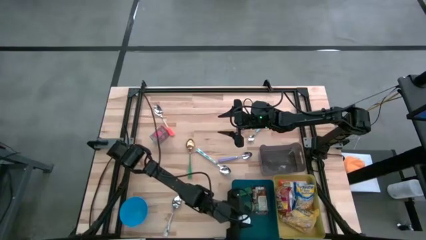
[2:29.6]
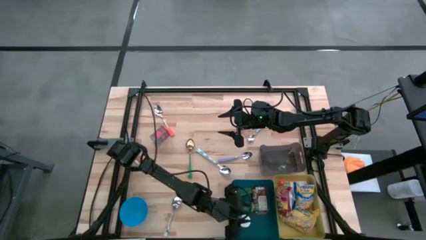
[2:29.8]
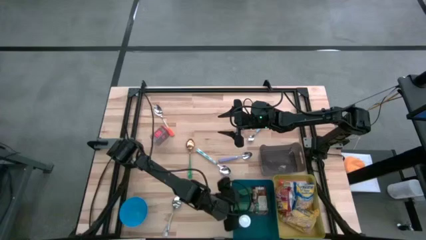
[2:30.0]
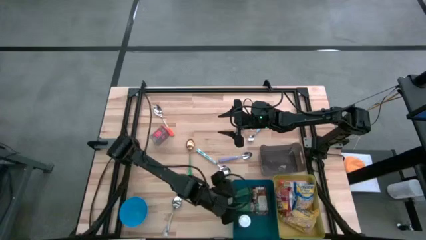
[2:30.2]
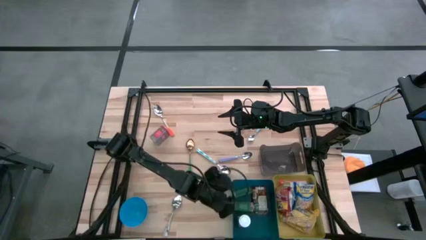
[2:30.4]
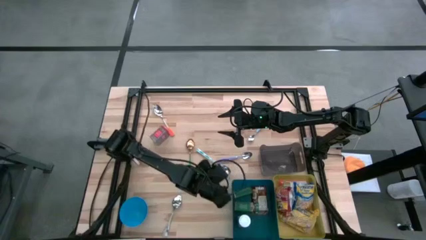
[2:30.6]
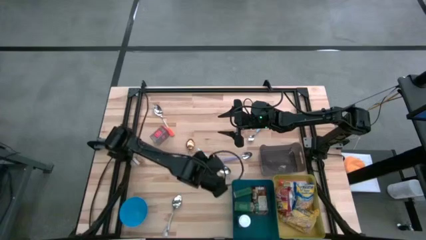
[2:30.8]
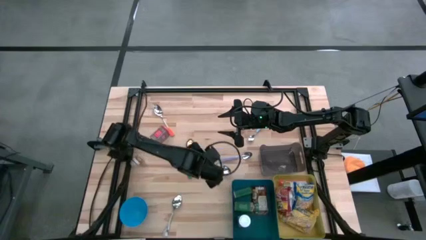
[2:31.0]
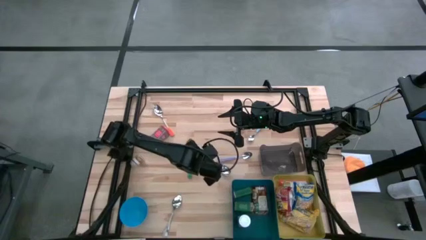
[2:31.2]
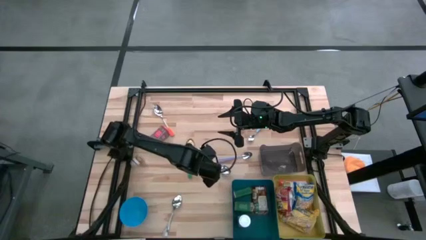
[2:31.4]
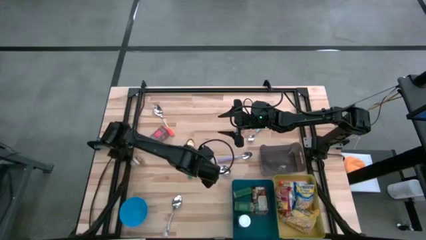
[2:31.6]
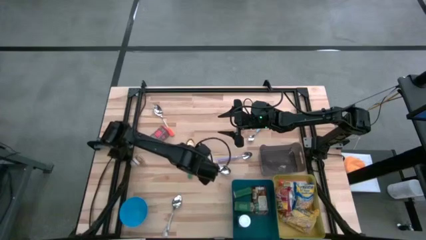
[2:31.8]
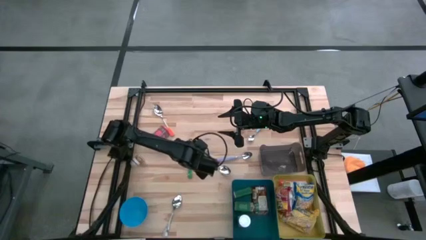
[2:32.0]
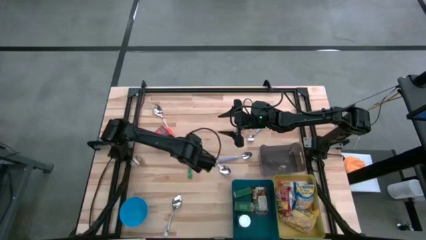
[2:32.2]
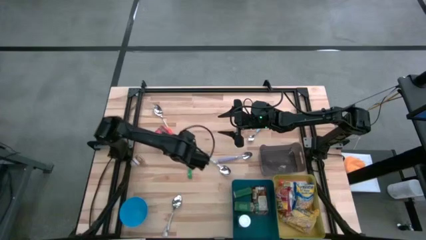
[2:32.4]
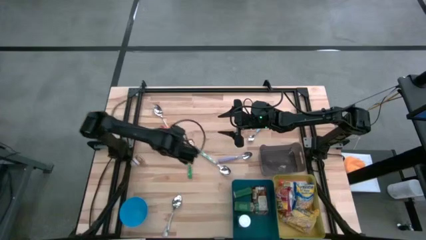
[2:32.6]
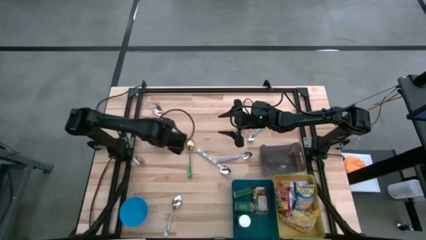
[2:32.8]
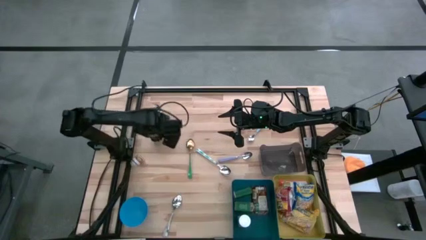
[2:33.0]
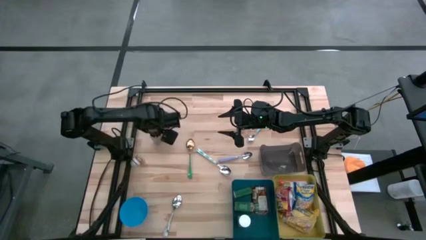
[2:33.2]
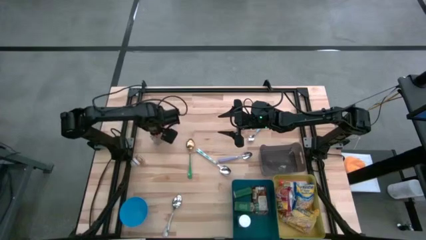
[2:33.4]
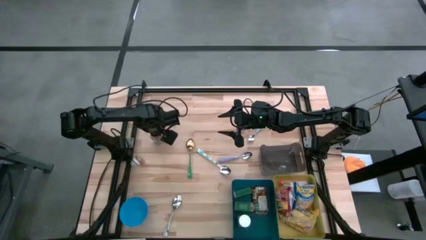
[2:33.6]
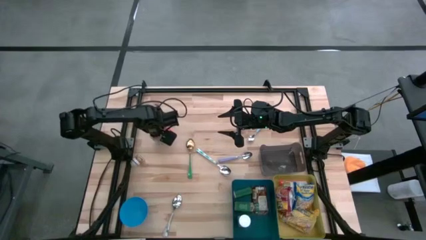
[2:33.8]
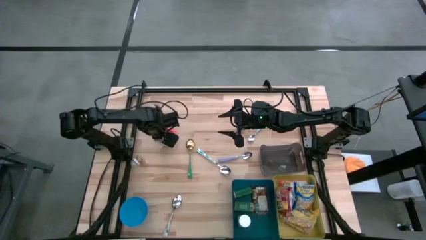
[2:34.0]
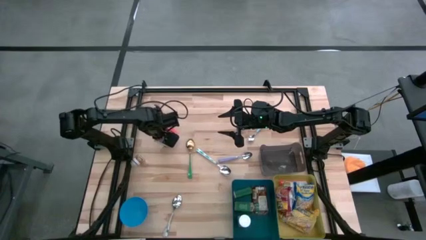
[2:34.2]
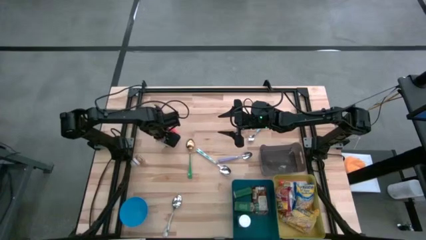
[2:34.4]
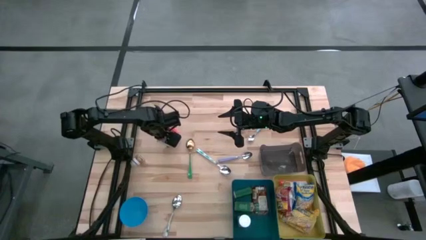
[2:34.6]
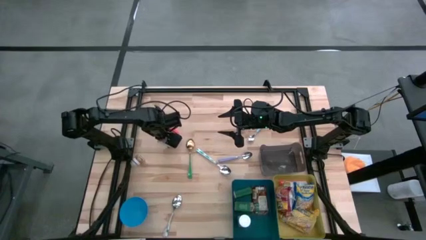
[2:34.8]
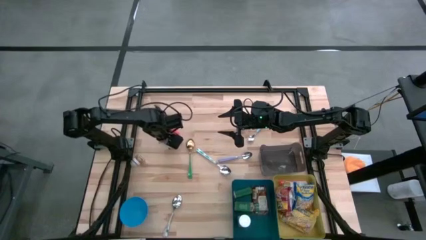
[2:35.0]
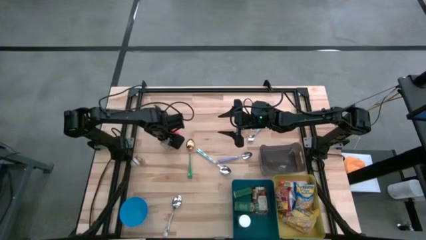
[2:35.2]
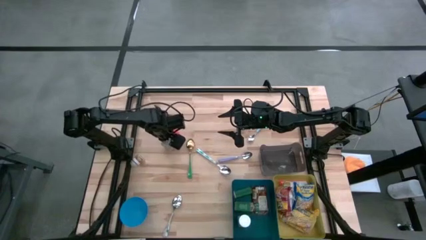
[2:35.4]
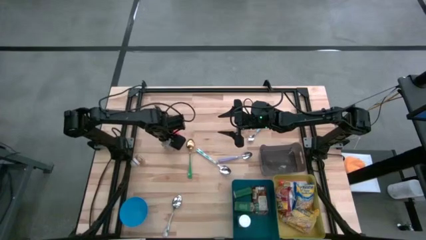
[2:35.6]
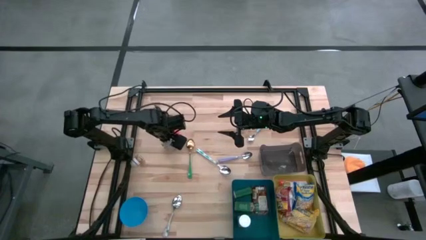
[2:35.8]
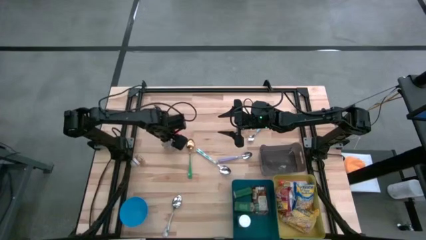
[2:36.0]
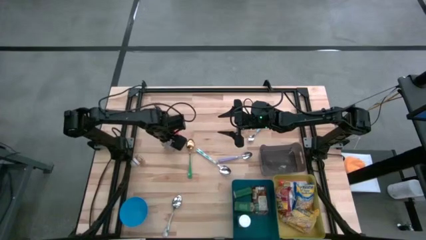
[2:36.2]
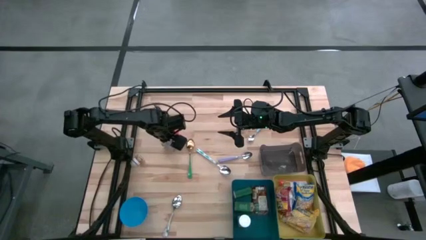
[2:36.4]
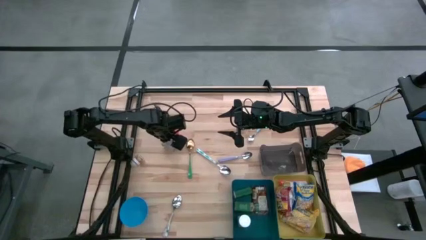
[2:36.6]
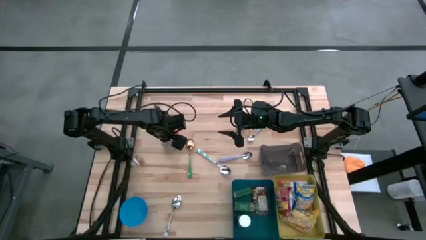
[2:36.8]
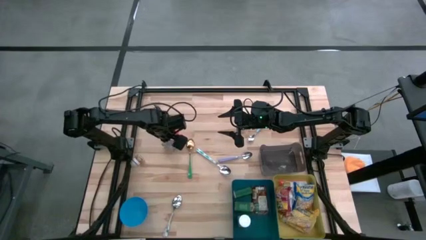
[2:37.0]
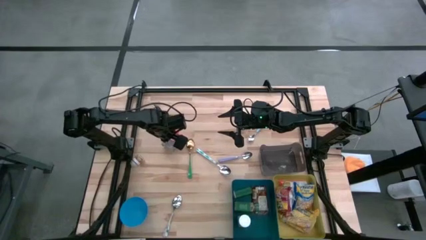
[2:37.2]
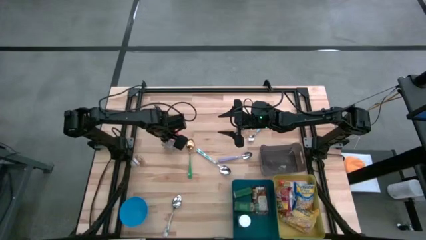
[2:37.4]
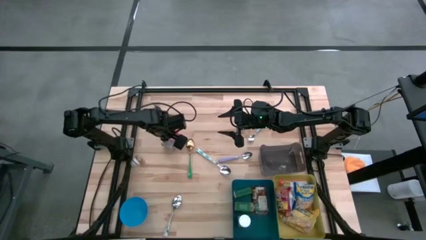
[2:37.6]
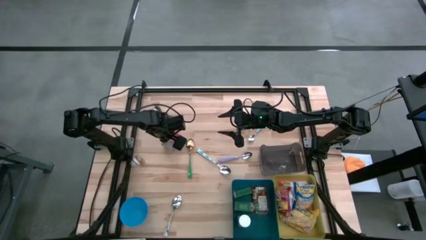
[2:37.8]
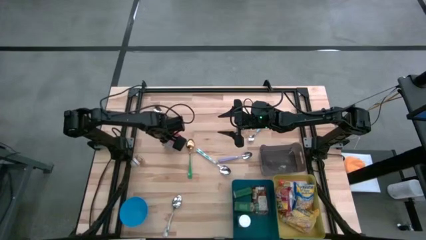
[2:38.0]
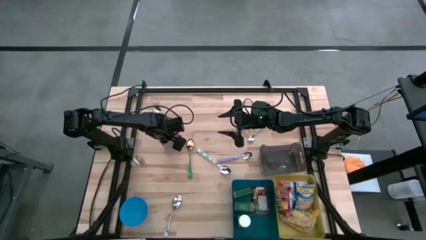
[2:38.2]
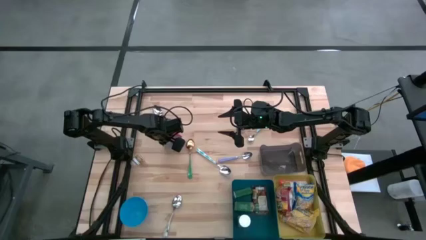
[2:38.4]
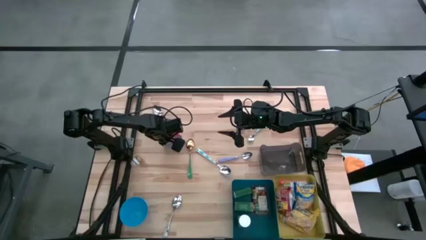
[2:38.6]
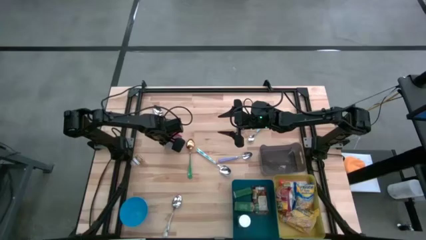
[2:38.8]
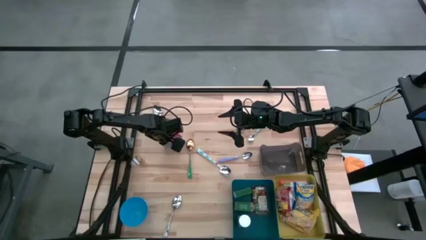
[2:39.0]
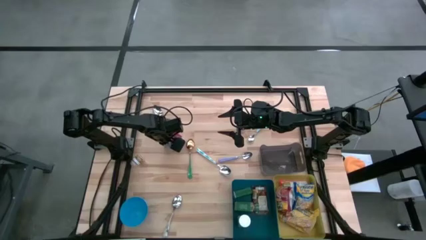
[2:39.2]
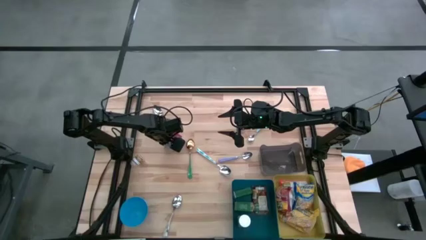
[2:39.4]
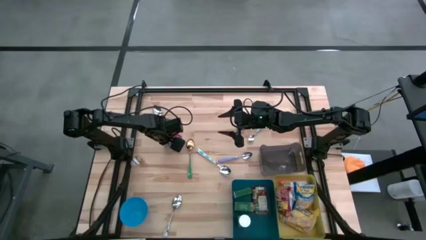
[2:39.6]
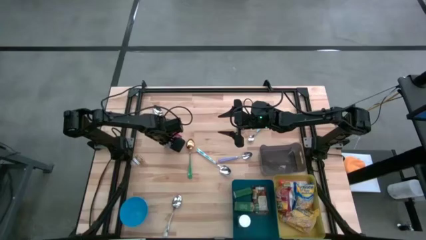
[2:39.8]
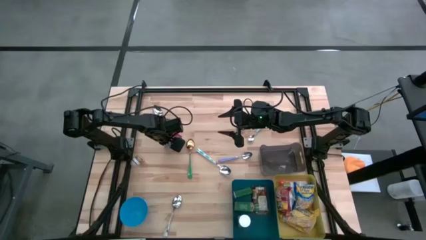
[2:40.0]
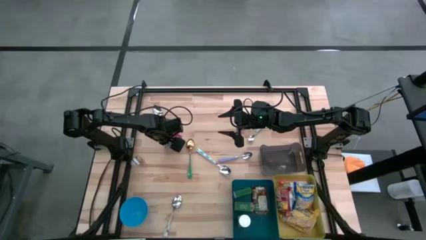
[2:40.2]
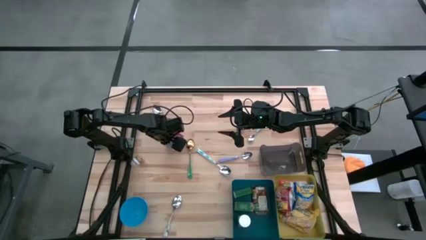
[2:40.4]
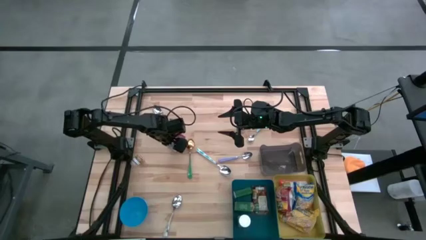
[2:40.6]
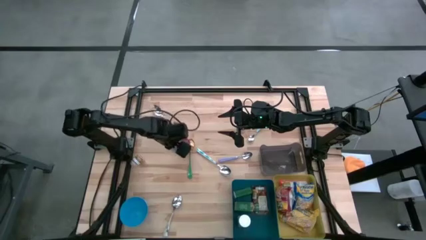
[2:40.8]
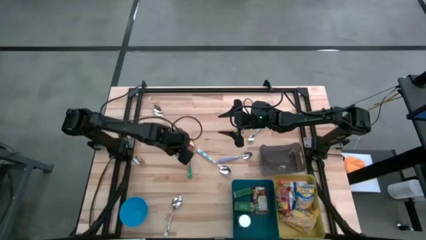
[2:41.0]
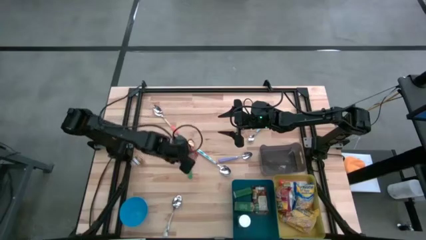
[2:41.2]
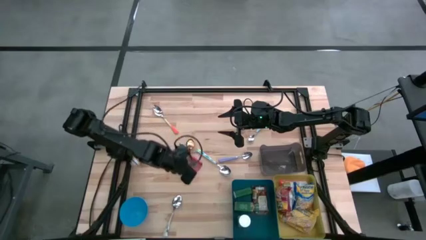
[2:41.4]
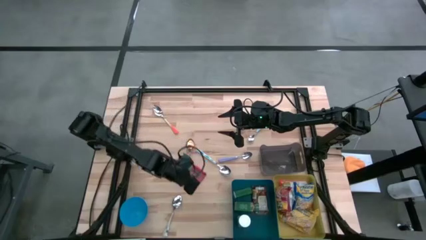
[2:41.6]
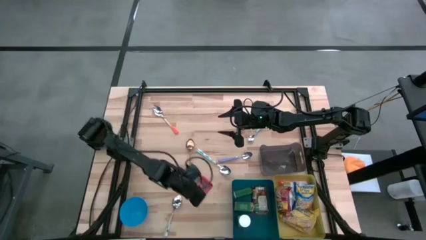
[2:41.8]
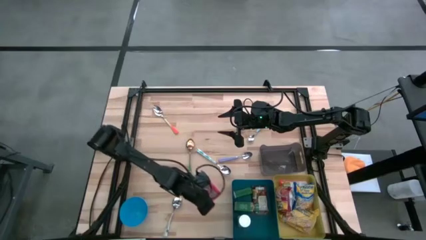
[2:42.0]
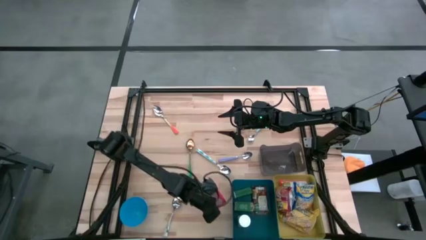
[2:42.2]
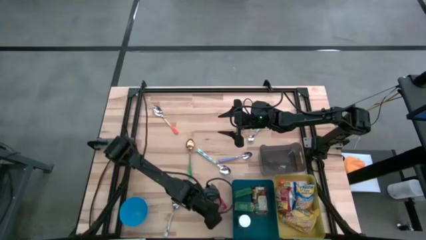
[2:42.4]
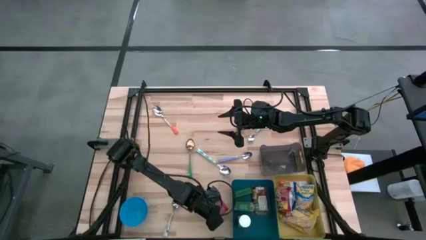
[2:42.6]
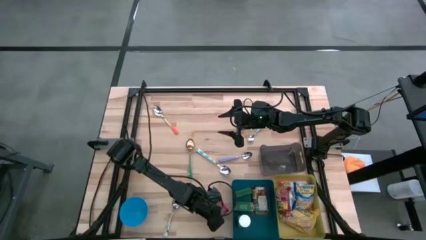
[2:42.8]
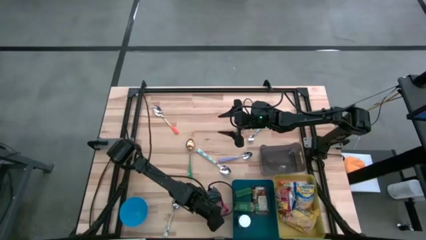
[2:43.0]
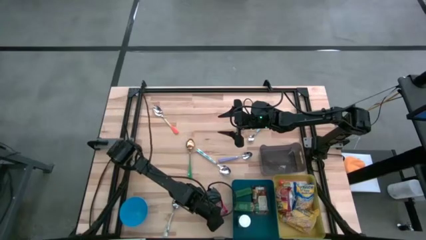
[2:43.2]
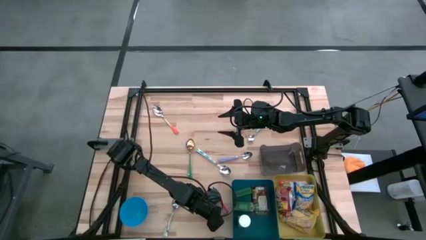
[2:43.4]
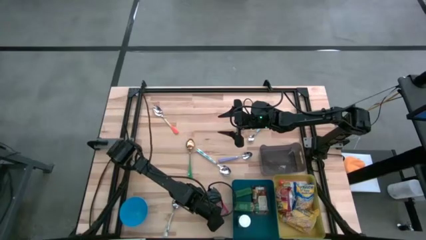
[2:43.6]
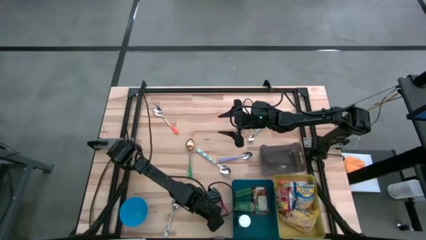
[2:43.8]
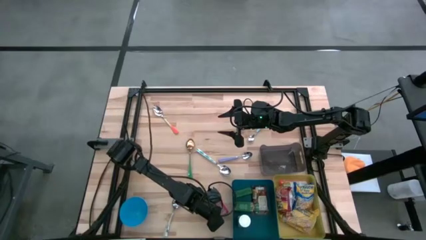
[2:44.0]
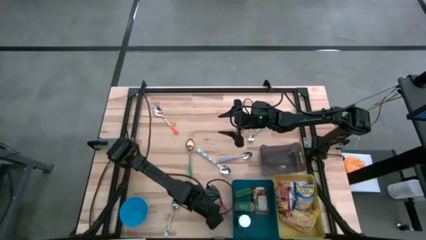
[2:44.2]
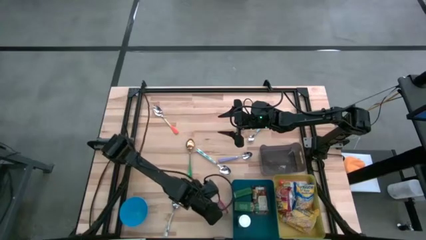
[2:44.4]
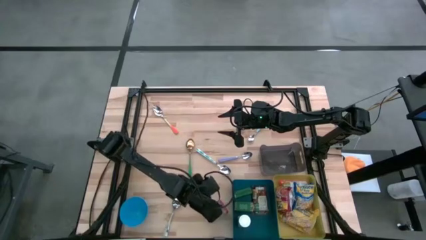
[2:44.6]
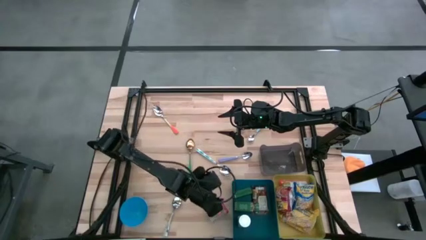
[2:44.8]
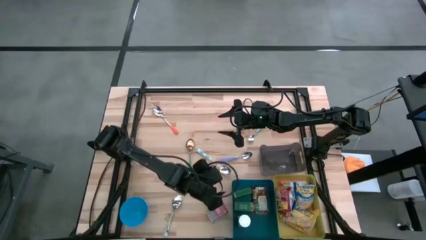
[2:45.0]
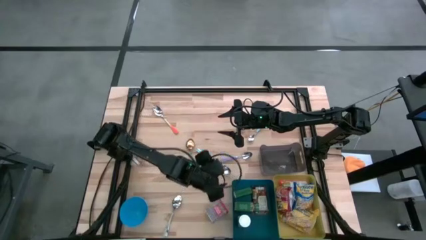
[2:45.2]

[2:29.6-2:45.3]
Put the red seasoning can into the blue bin
